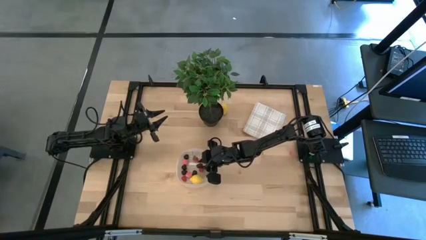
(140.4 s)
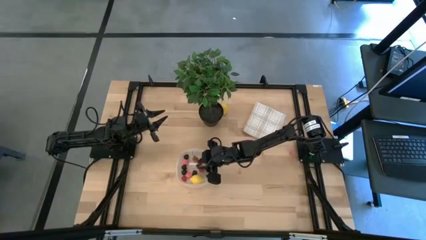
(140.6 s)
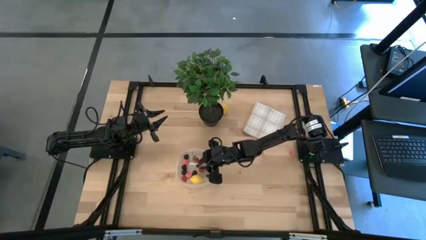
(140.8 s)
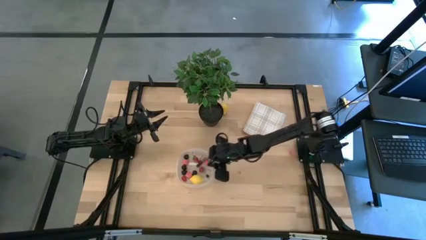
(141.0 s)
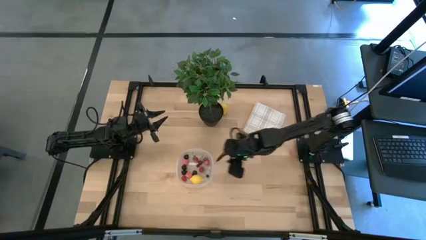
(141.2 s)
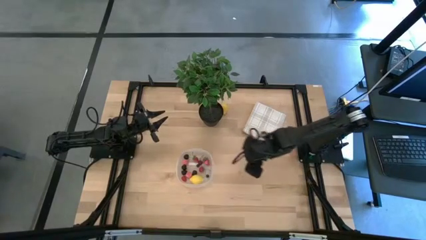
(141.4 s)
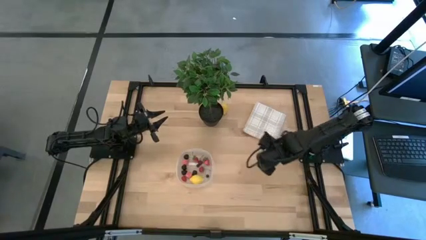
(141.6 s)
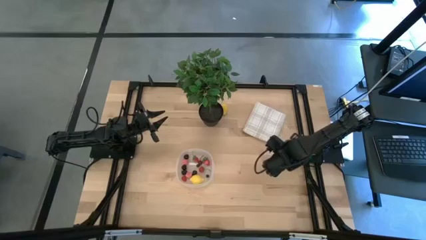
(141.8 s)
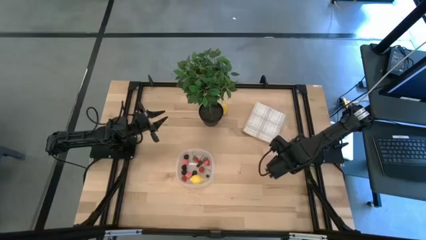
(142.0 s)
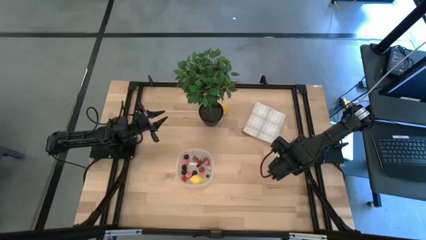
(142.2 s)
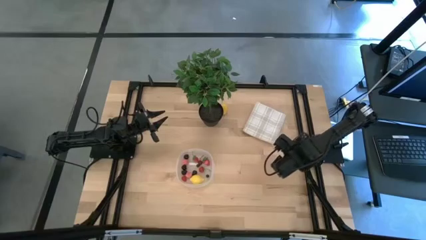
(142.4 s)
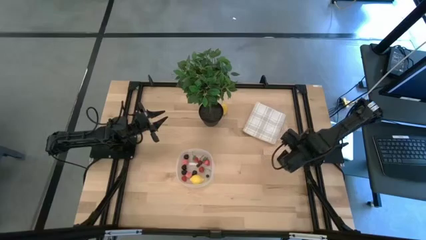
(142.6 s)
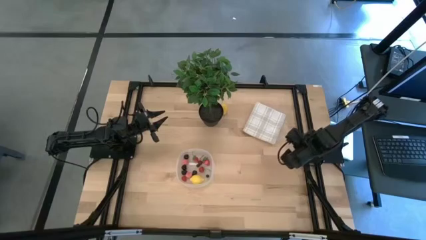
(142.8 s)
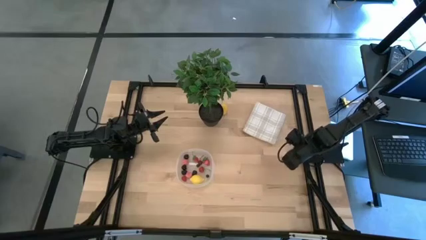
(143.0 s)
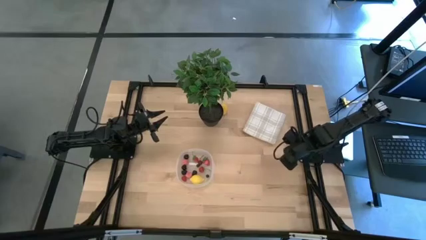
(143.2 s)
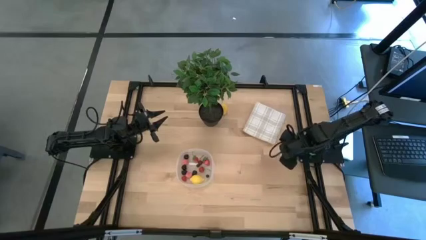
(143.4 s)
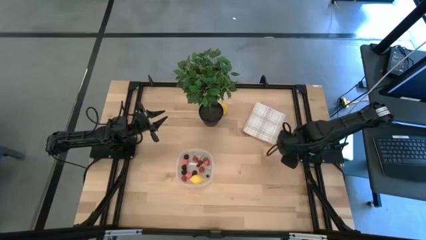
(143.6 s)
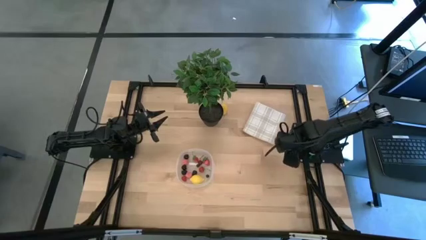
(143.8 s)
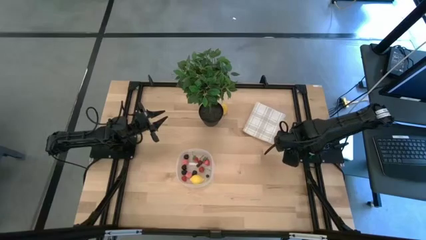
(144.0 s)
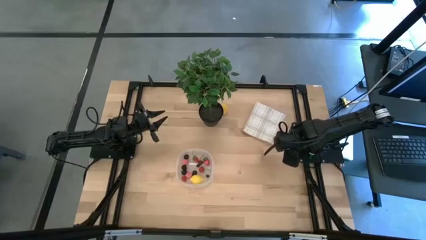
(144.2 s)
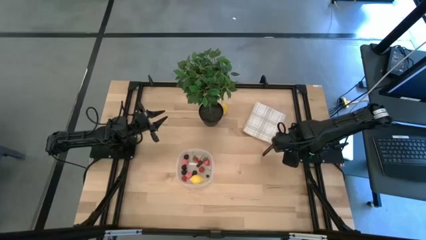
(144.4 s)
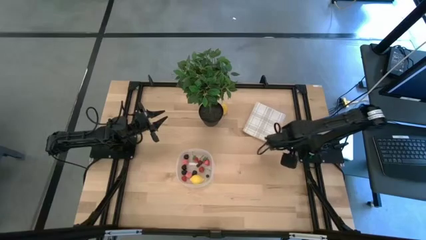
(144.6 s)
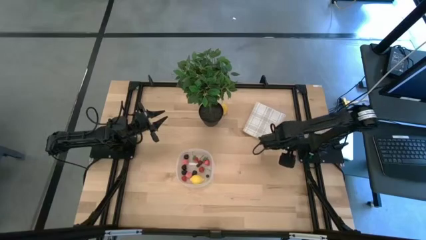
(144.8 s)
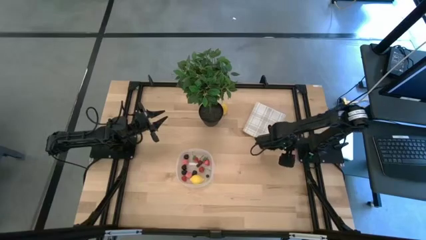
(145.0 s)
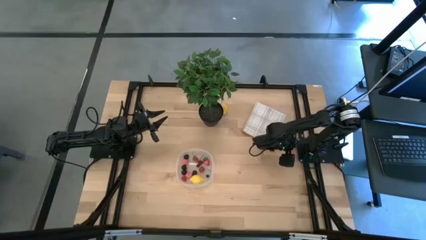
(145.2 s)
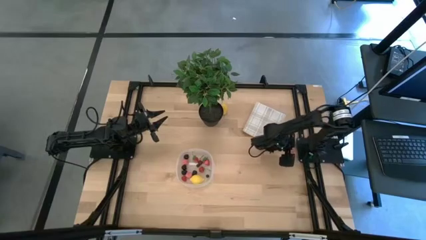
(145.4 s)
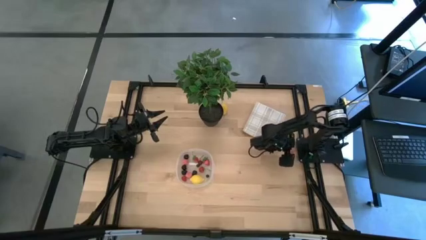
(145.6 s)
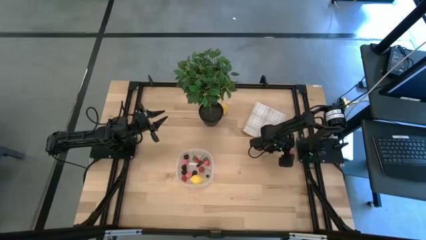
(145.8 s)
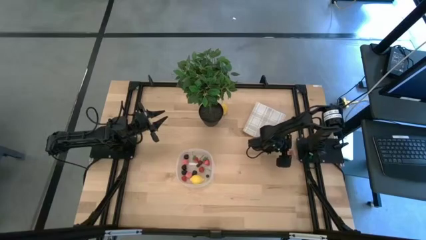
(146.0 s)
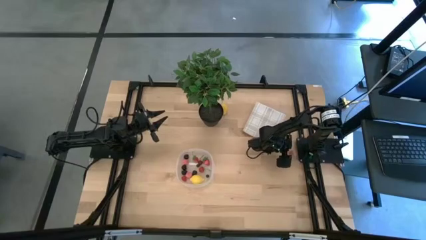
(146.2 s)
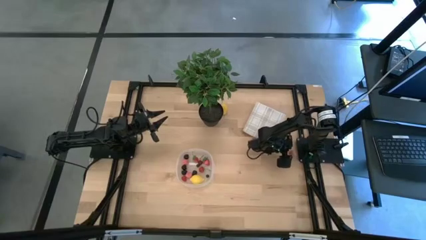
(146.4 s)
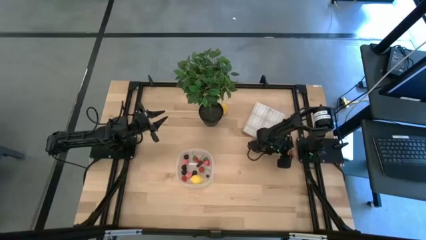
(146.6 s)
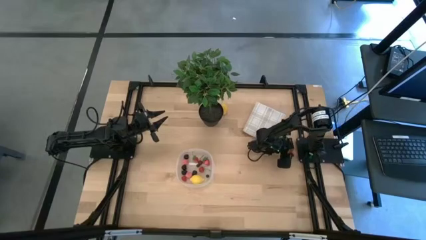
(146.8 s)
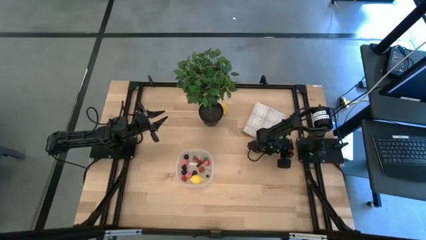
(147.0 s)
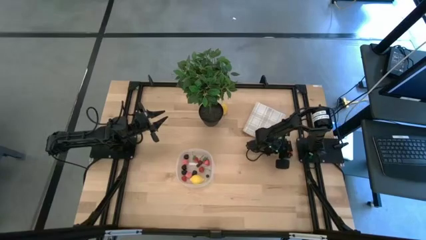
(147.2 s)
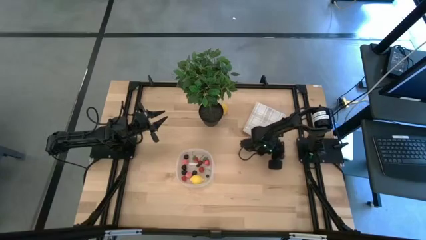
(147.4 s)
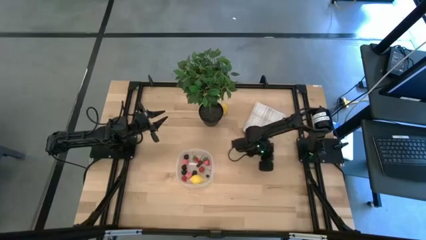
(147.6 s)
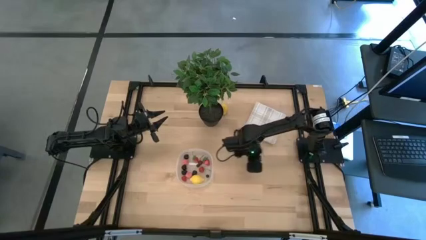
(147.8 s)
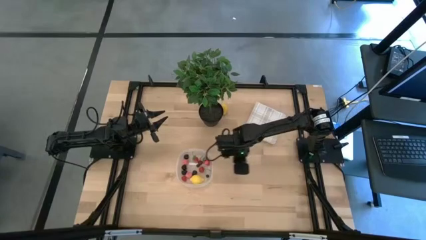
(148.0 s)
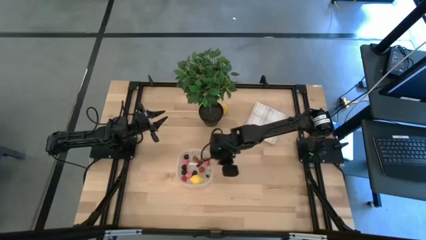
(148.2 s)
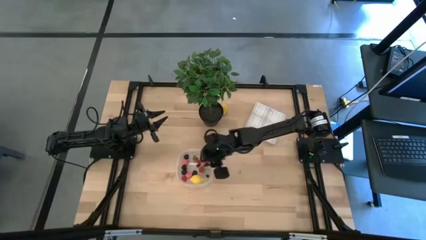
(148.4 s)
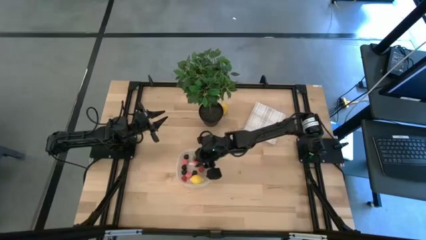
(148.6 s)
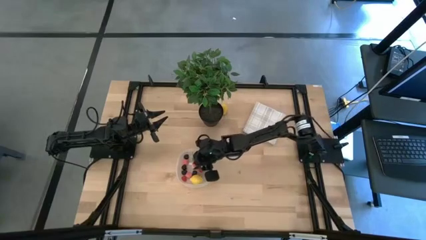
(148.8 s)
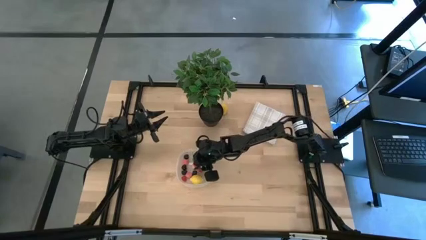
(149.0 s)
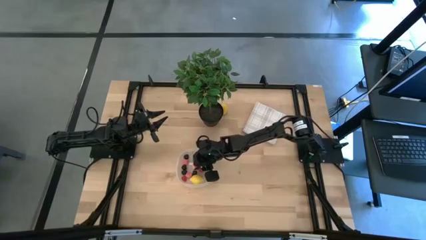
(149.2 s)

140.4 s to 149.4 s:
Task: Pick and placing Produce into tupperware
Put the pink peach into the transparent bin
